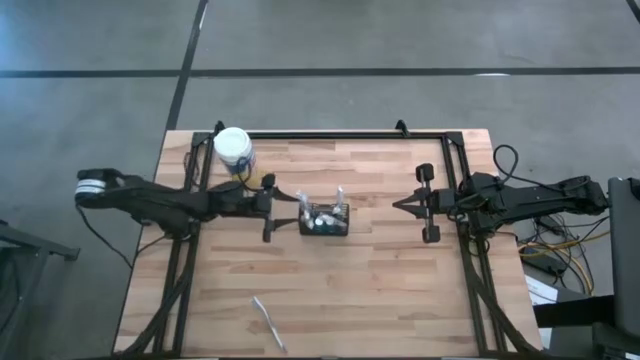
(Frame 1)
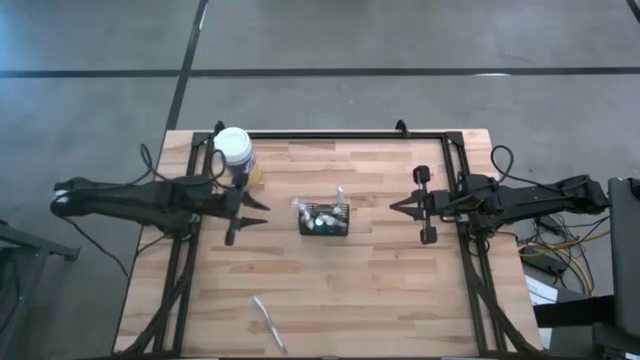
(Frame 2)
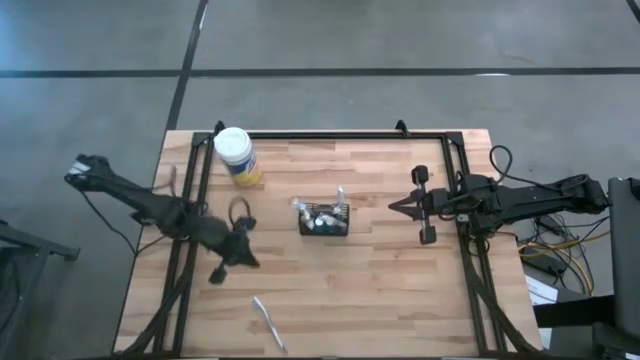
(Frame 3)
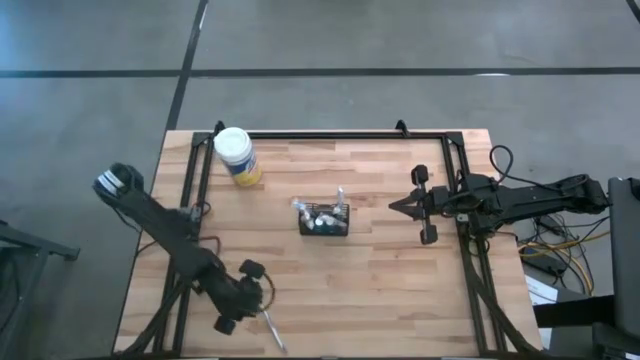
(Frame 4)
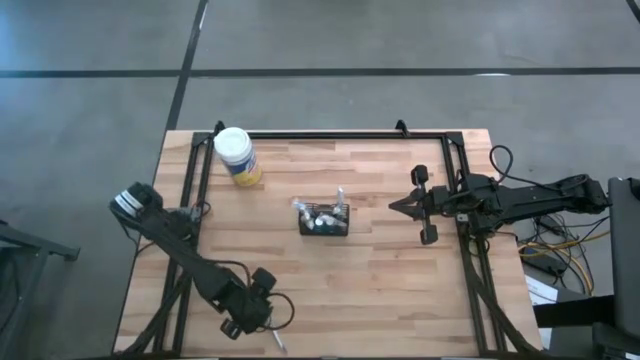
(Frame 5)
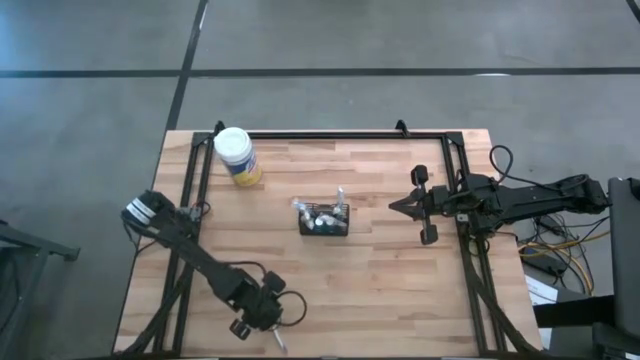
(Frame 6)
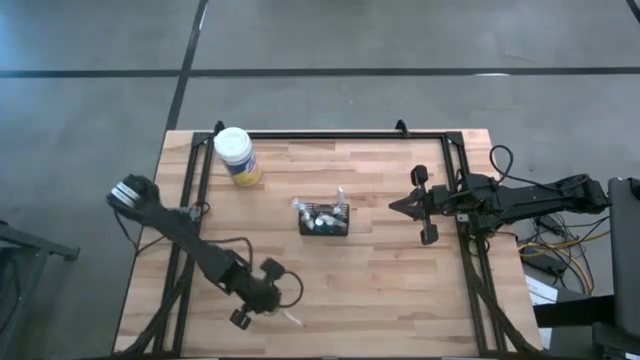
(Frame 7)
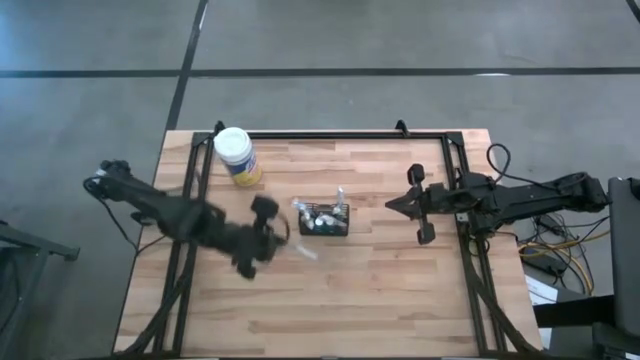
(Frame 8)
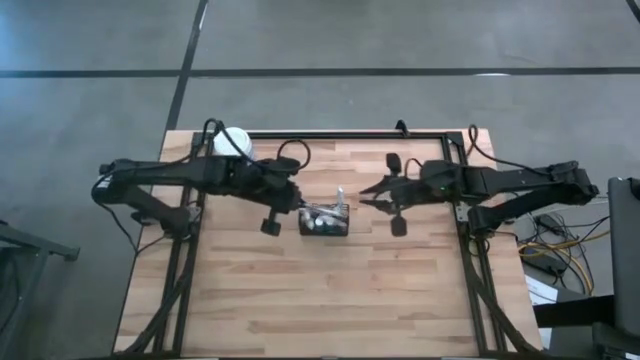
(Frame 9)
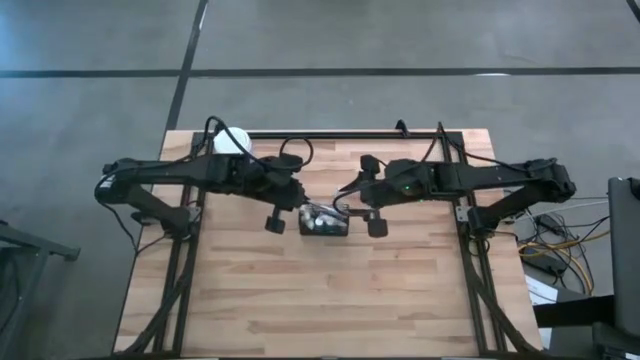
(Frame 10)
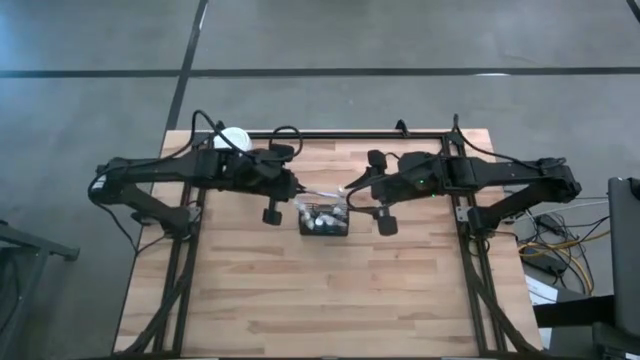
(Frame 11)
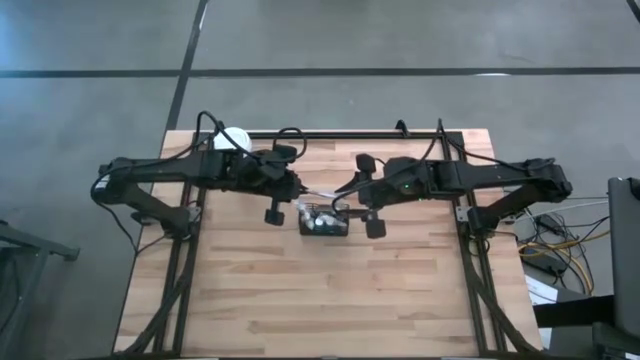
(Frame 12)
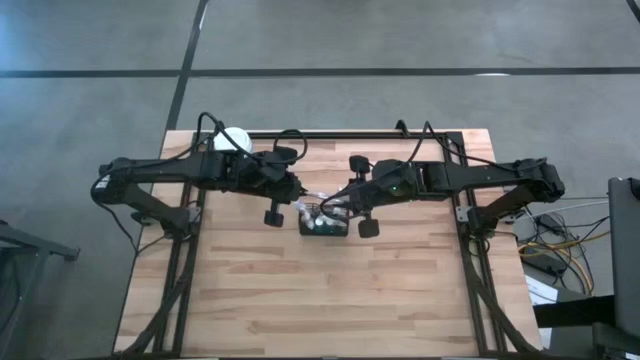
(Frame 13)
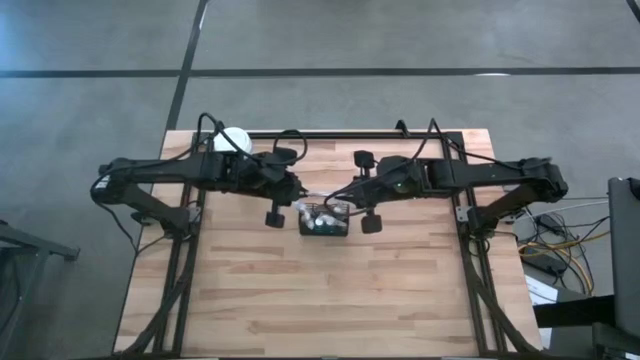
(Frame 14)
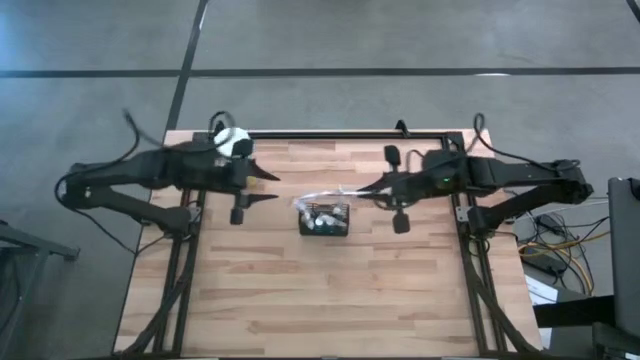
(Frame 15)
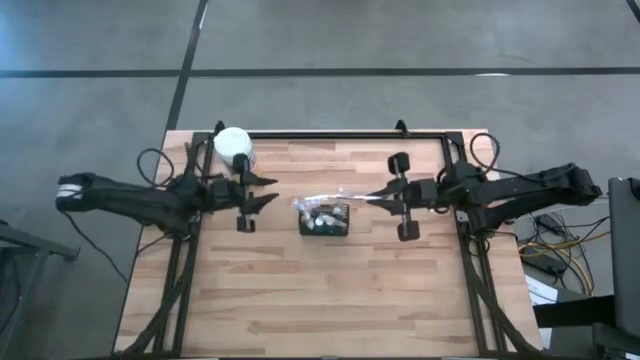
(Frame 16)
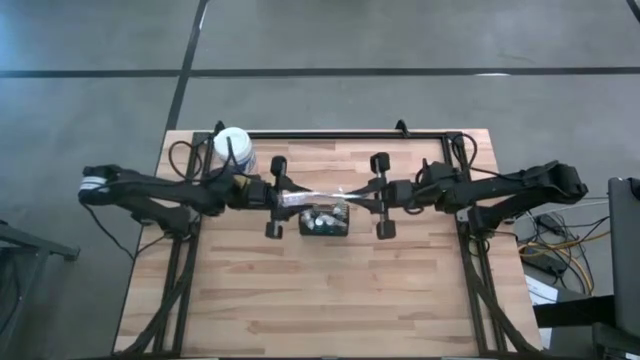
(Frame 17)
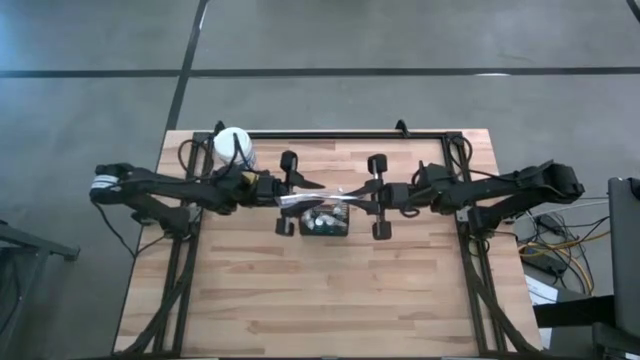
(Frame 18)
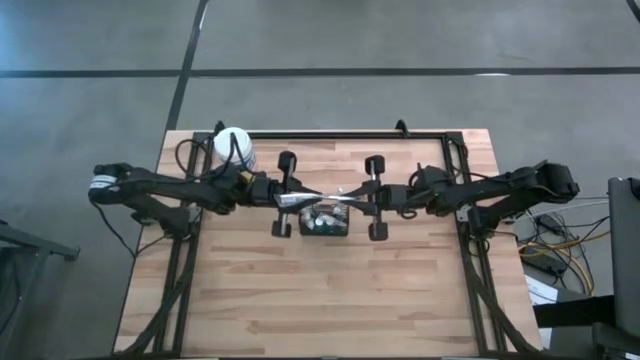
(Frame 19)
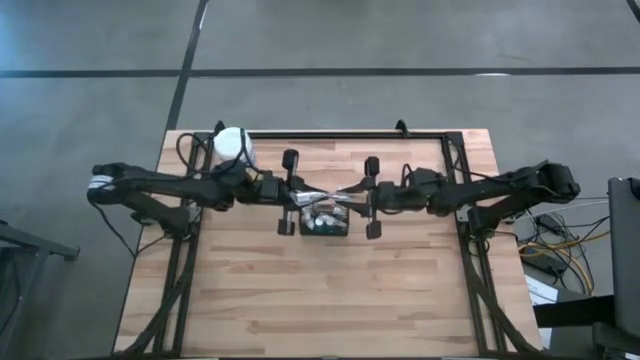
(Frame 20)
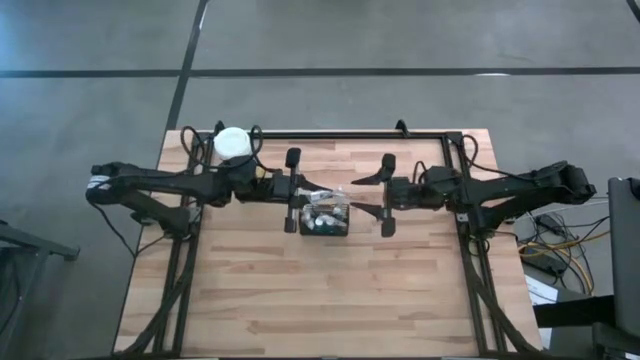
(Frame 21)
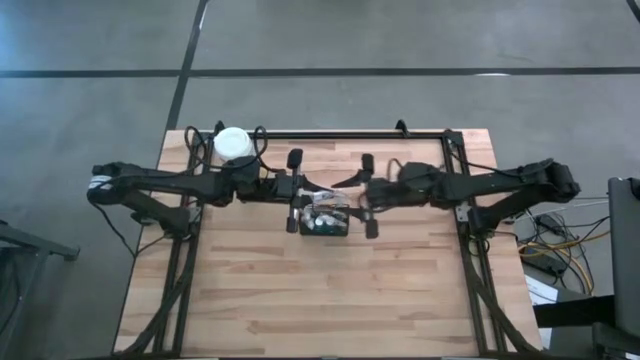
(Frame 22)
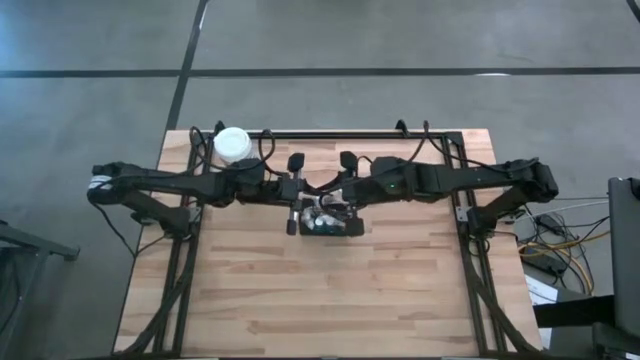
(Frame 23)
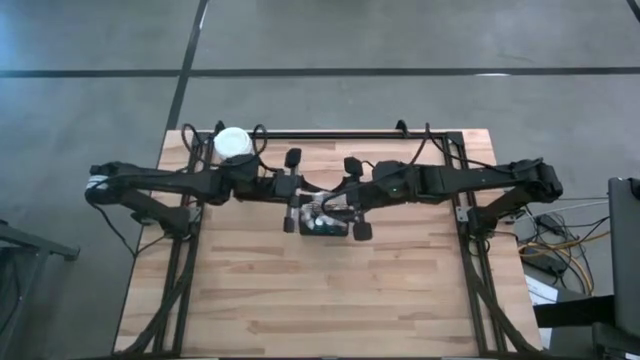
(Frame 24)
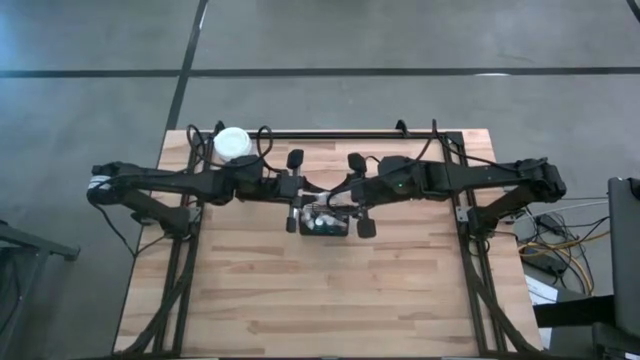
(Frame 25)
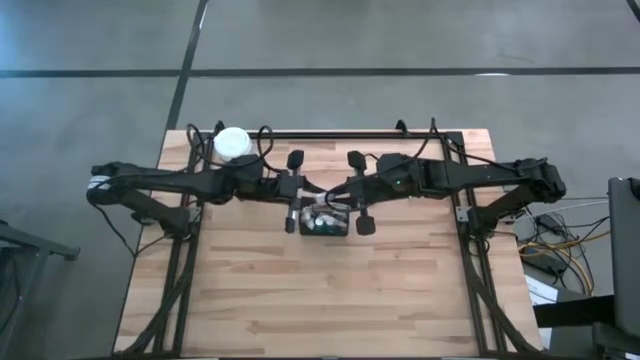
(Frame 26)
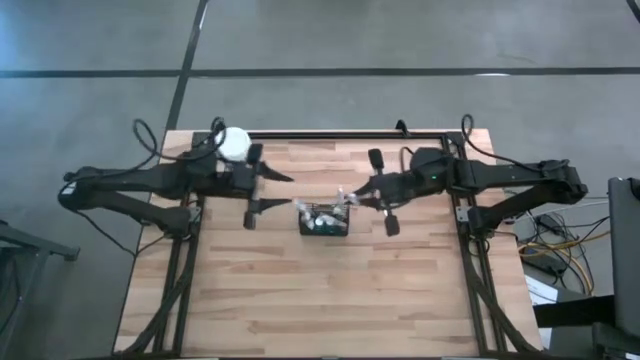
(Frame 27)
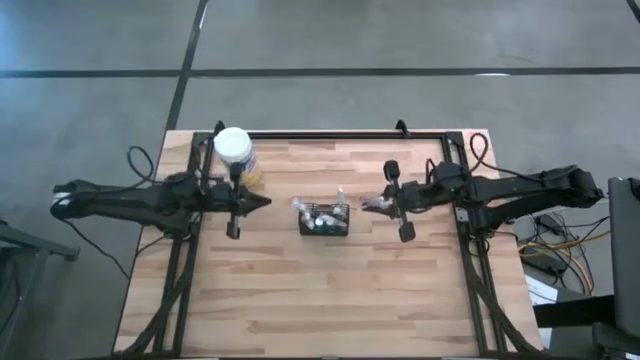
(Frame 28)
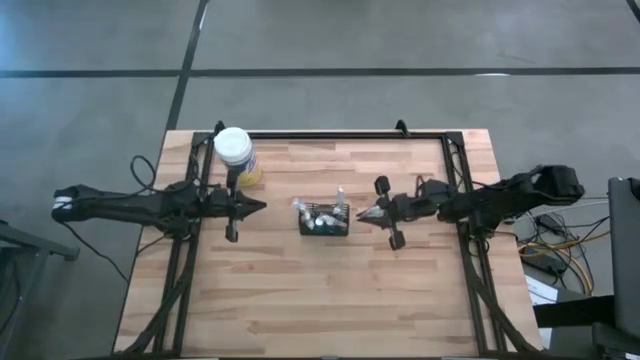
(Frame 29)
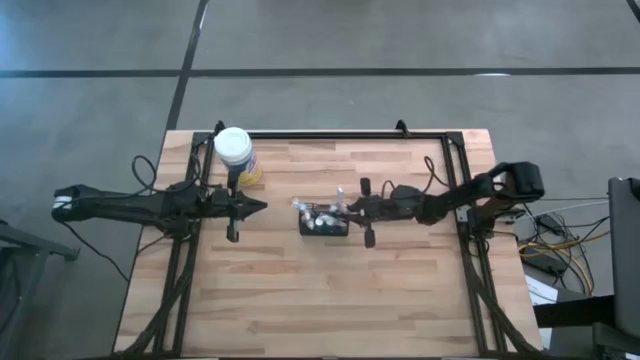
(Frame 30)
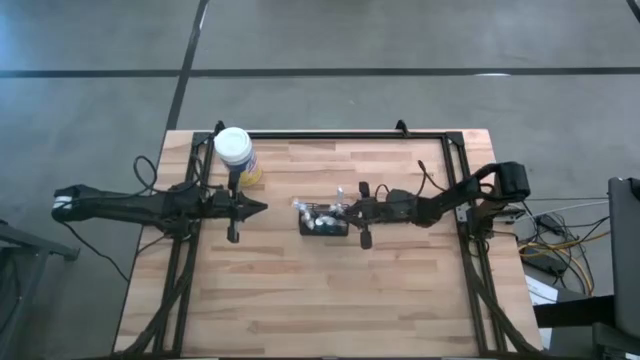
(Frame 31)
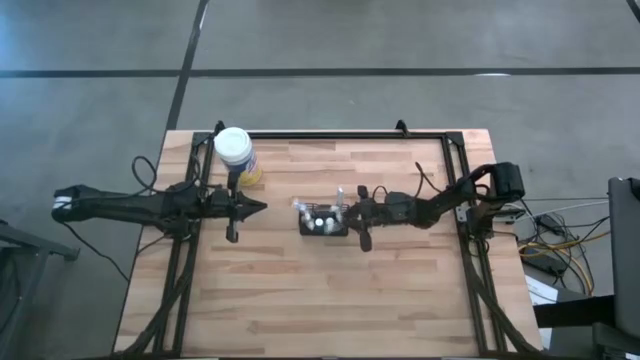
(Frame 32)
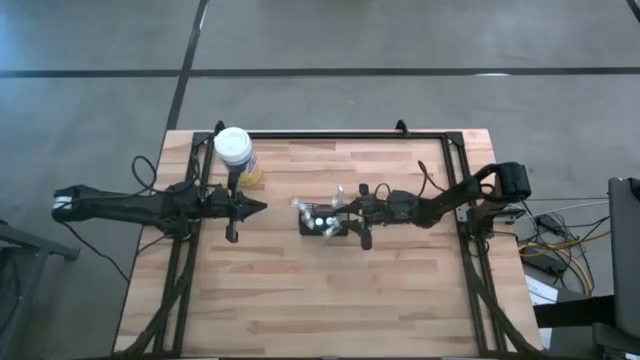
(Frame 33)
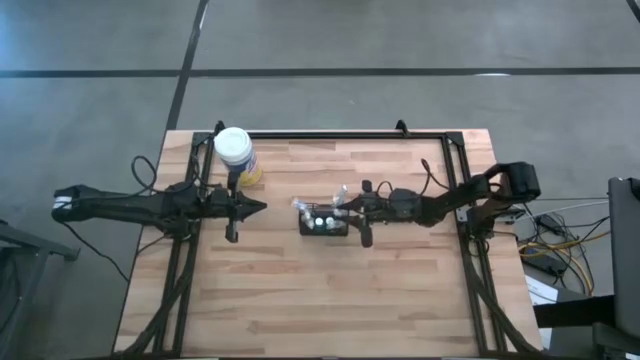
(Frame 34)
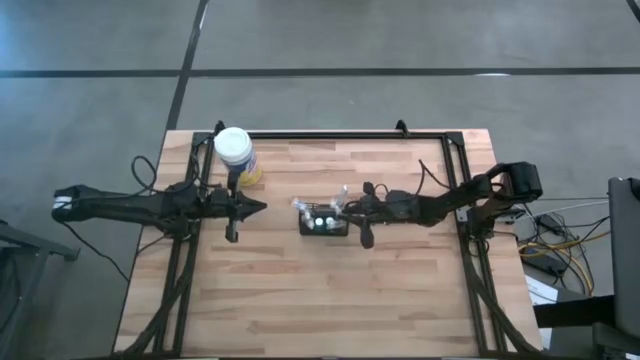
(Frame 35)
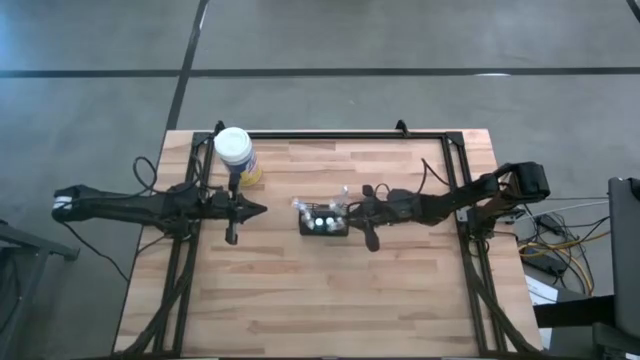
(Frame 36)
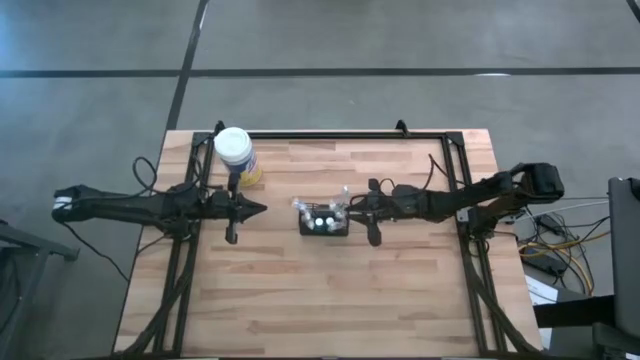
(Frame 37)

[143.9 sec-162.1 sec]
Task: Pick & Place toothbrushing station
Put the violet toothbrush into the mesh organizer

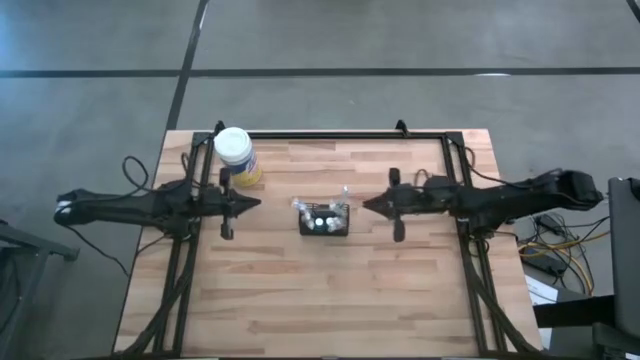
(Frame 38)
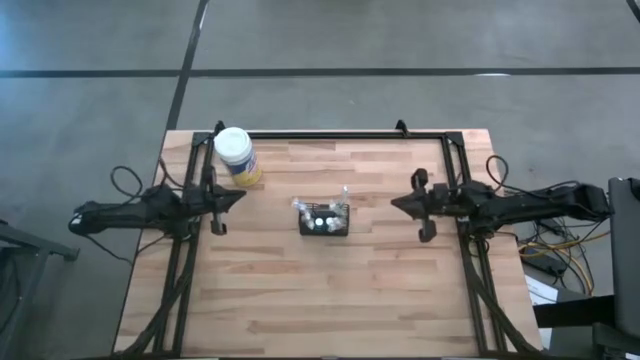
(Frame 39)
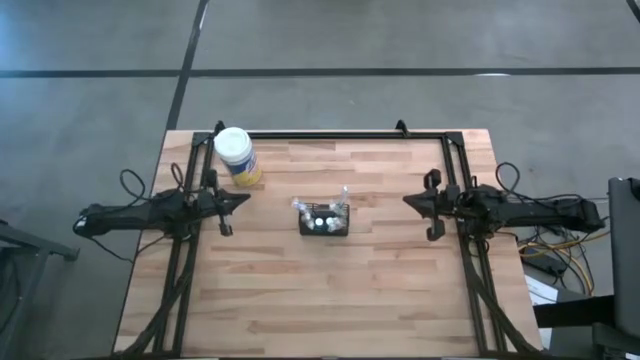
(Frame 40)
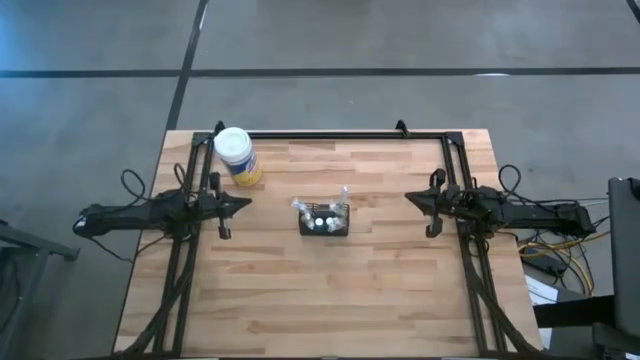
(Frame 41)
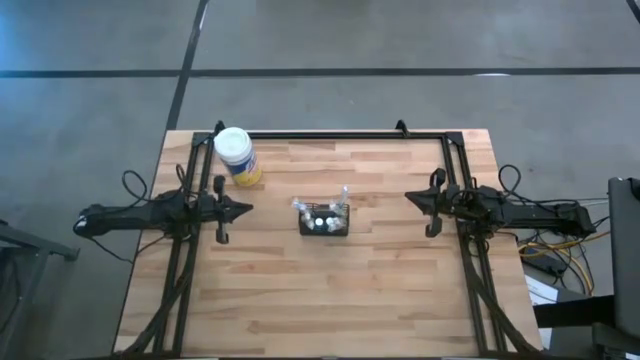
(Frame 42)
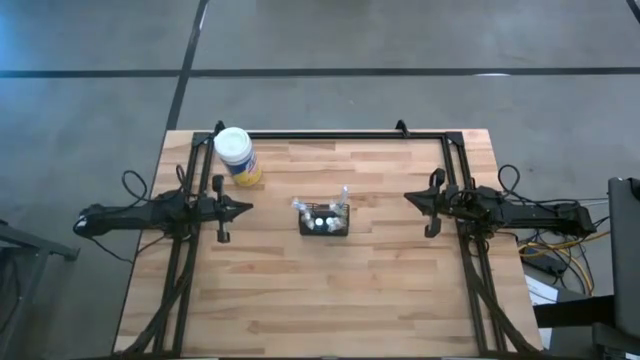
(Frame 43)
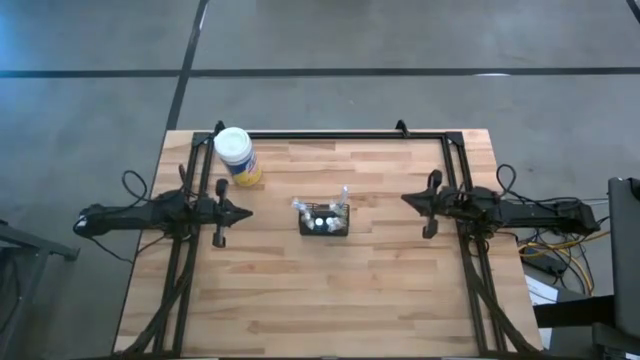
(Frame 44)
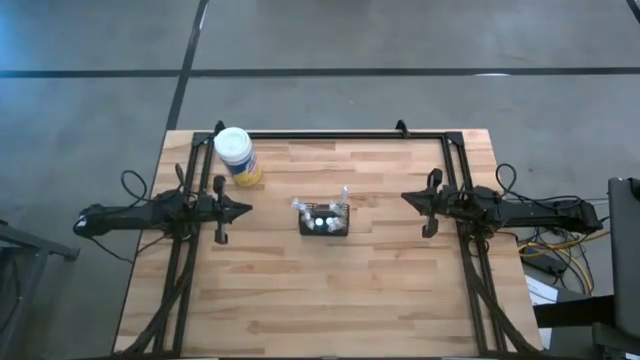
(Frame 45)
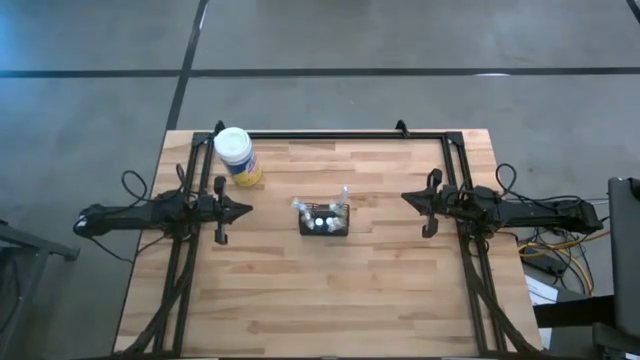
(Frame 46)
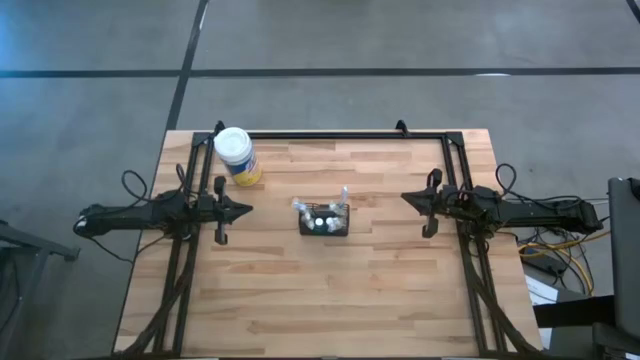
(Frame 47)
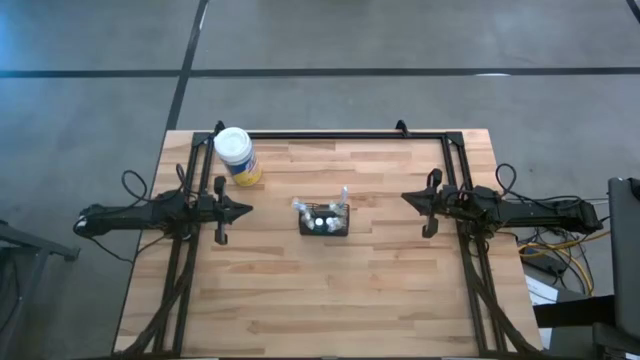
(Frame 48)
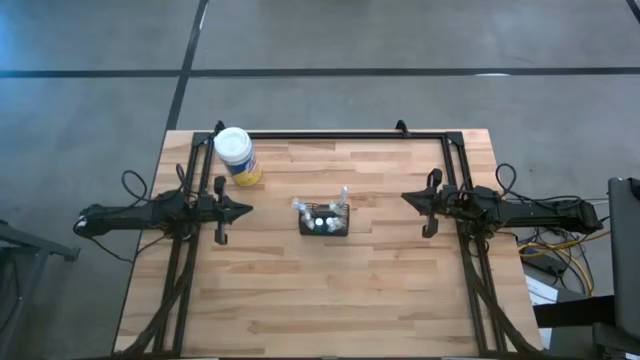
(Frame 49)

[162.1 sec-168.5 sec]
Return to Home Position
